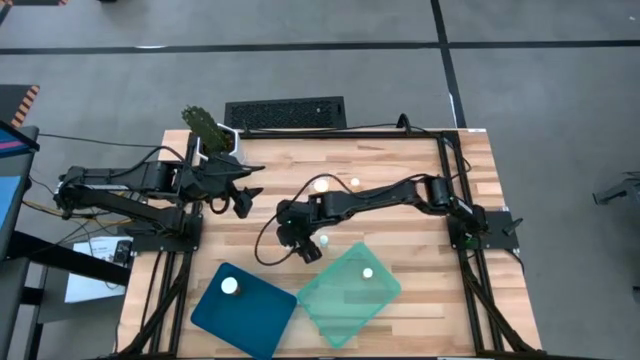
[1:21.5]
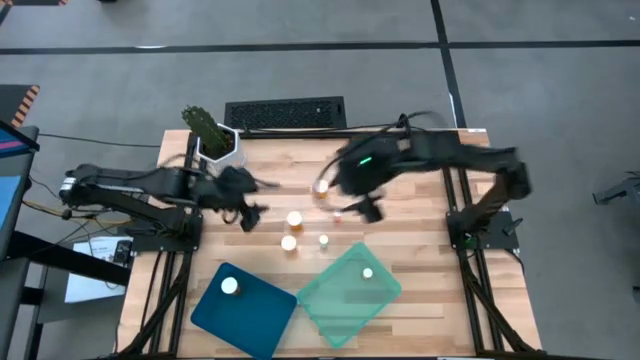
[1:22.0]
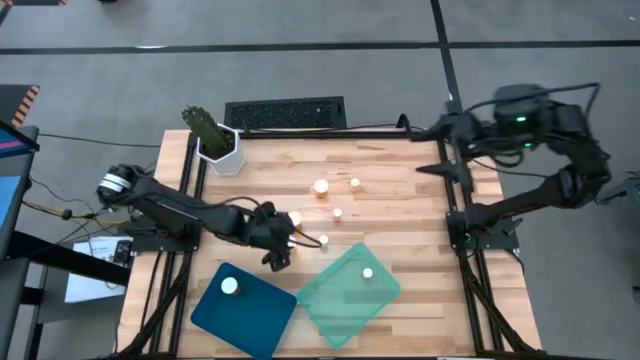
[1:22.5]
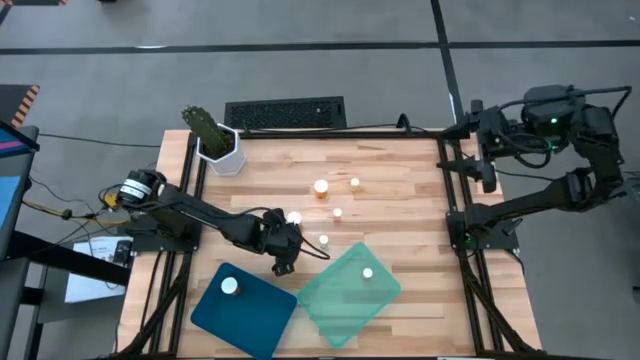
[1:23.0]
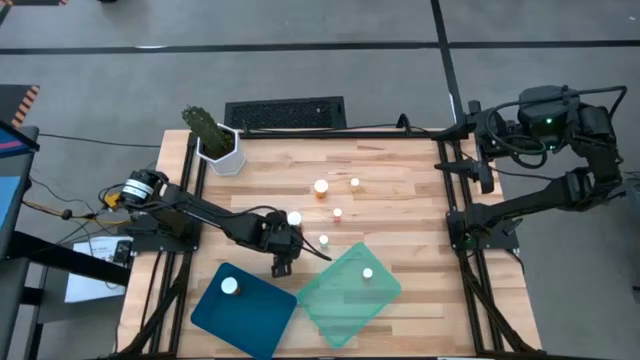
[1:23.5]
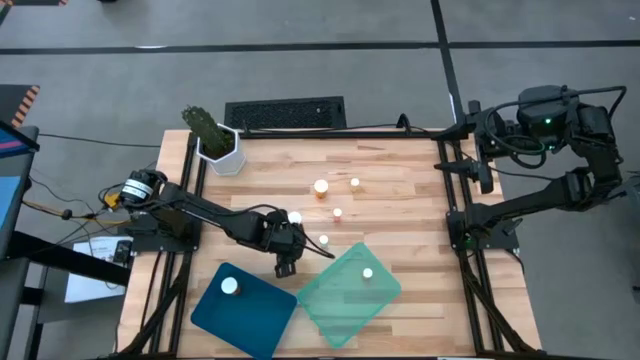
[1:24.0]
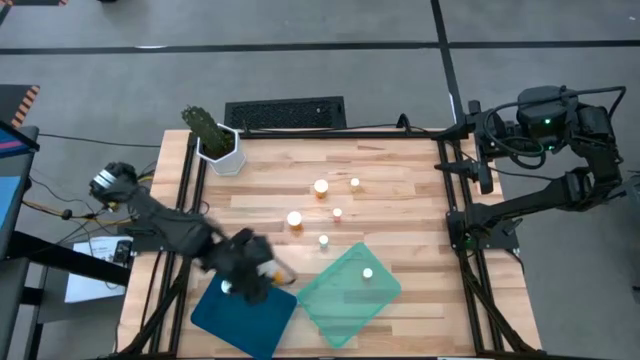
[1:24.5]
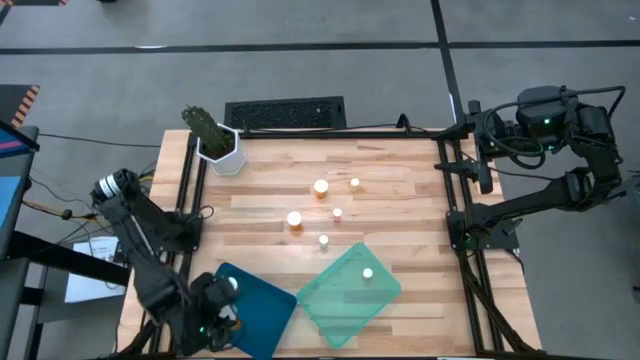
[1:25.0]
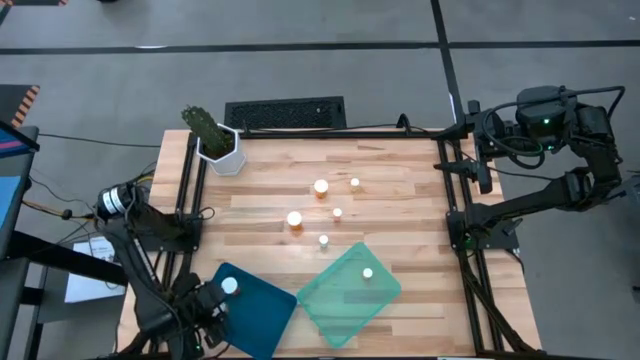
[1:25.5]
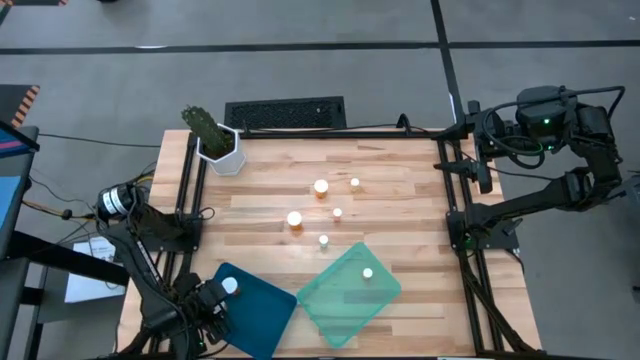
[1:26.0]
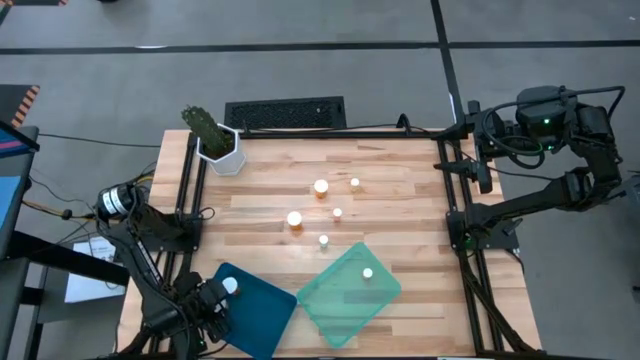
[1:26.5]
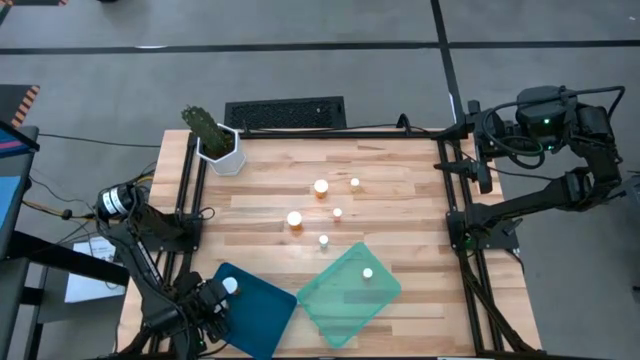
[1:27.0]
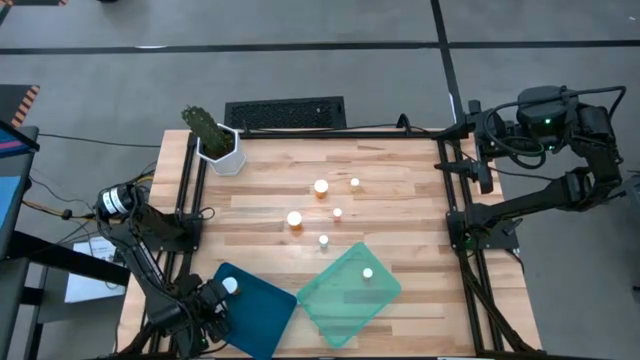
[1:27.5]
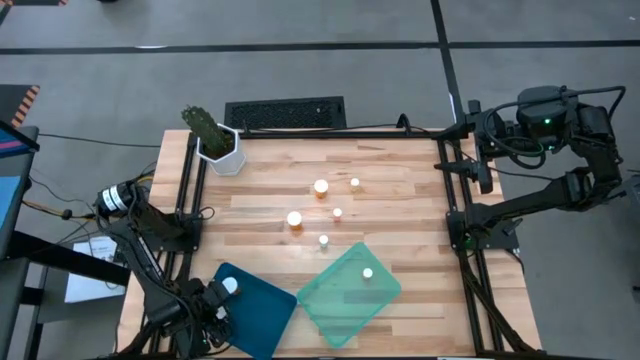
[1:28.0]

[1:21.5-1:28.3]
Task: Pick and place medicine bottles into bin by pill shape (circle, oval)
Put the big orange pill bottle into the blue bin

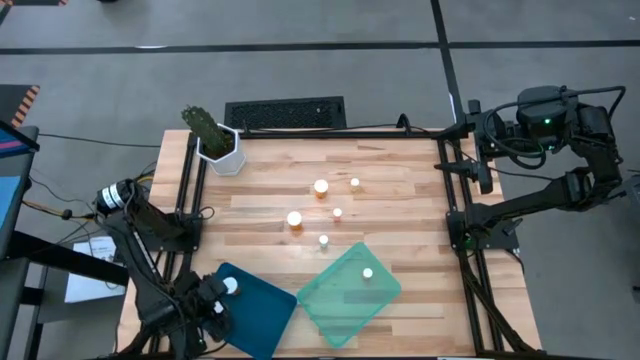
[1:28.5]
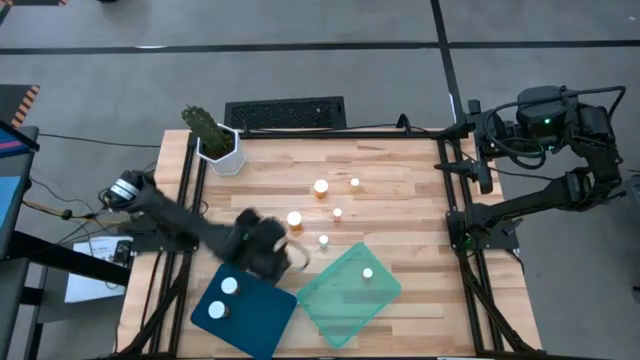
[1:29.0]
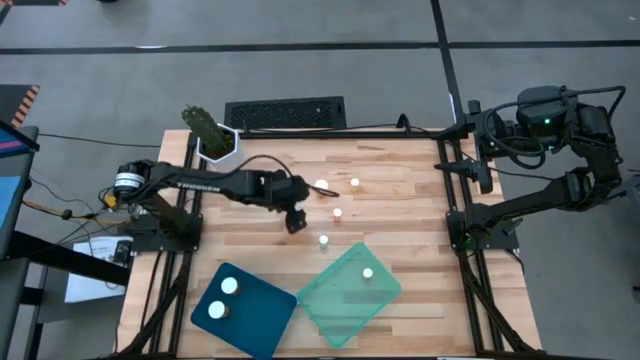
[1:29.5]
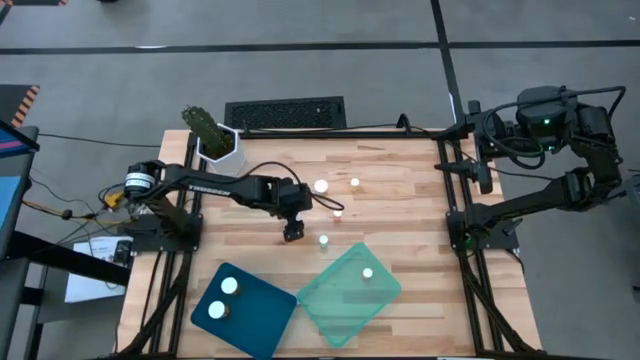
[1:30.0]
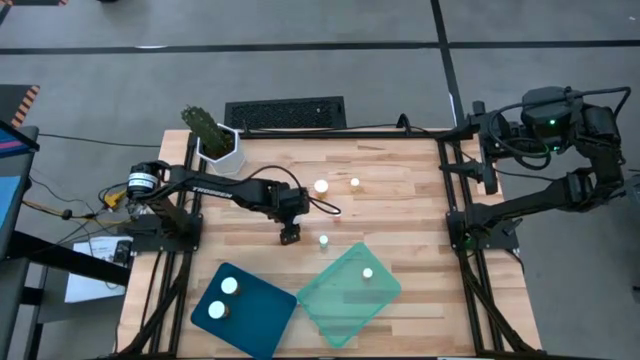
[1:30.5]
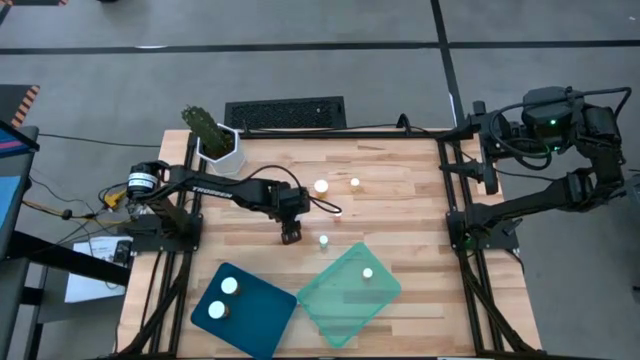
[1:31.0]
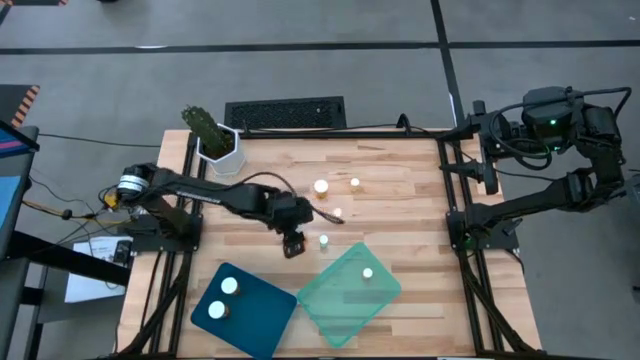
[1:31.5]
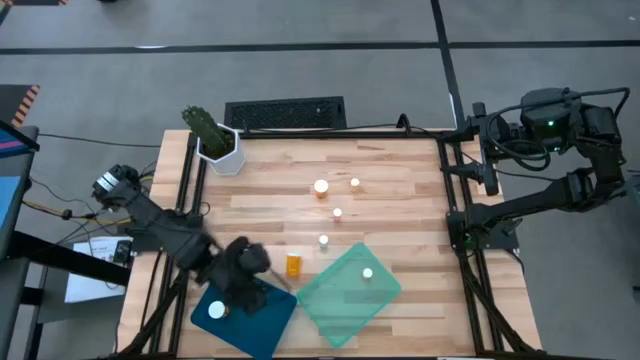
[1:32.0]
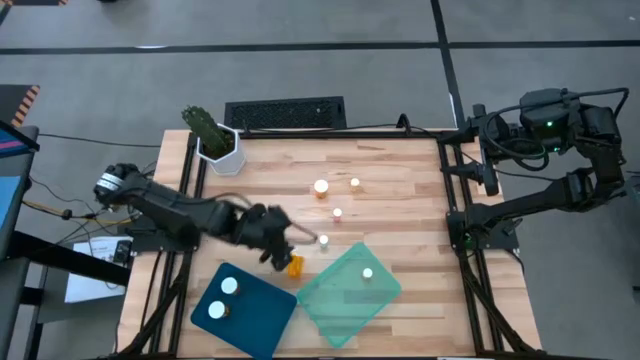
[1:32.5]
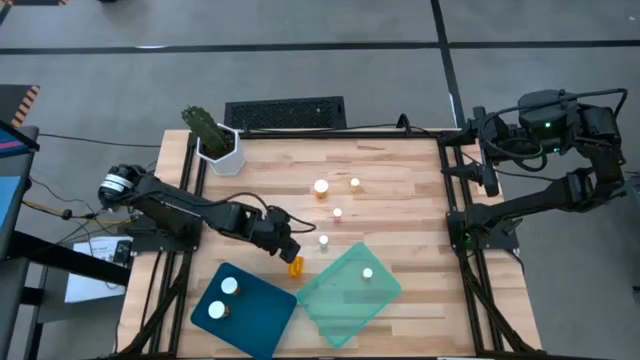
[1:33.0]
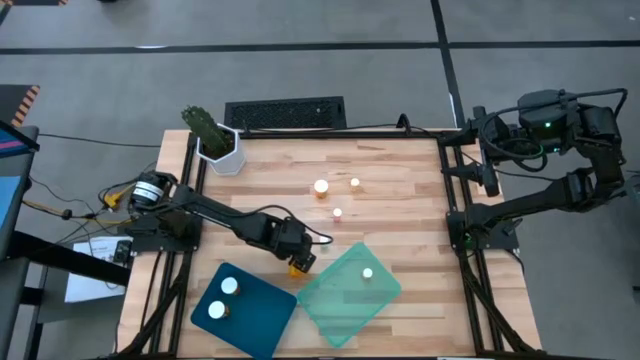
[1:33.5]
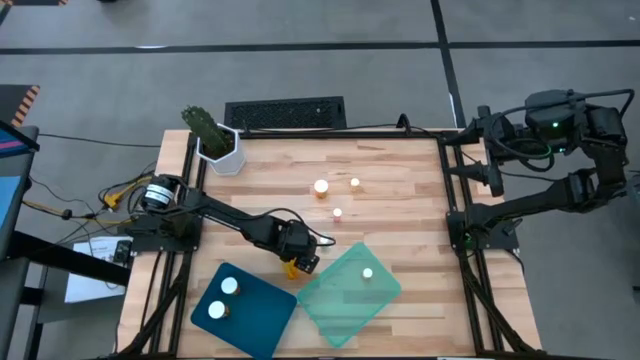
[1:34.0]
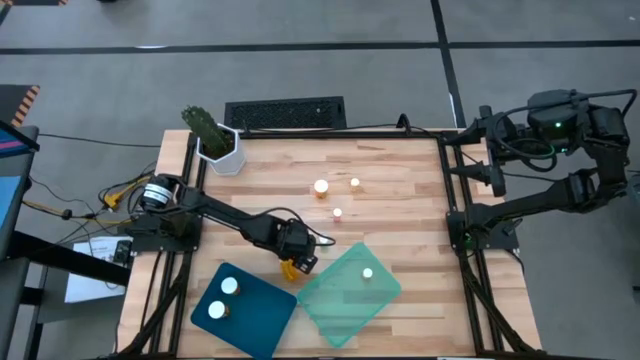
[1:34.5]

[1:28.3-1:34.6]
Put the big orange pill bottle into the blue bin

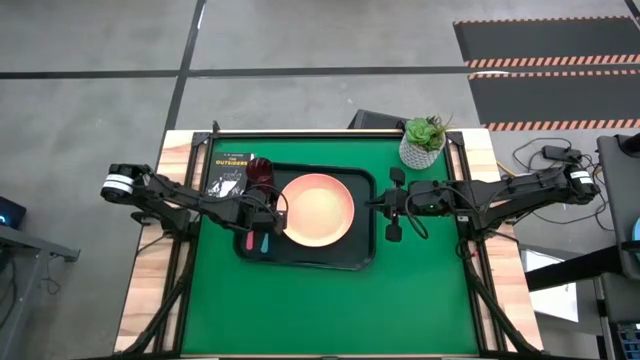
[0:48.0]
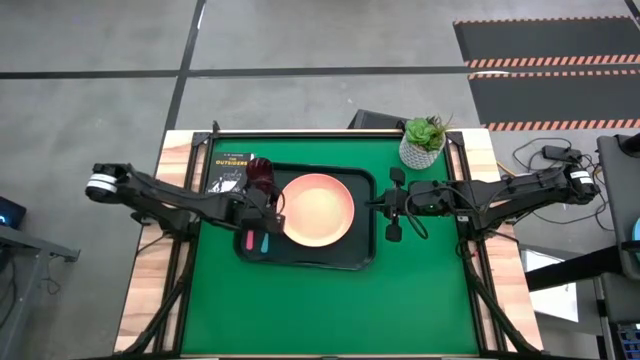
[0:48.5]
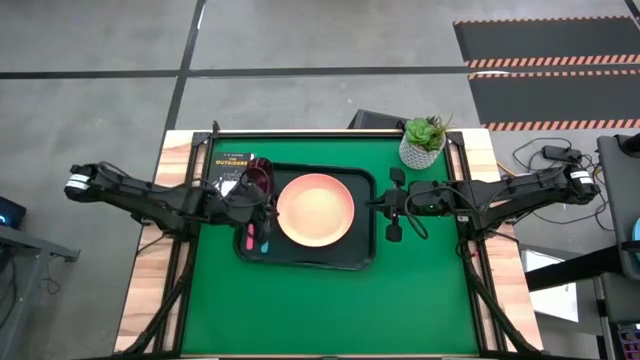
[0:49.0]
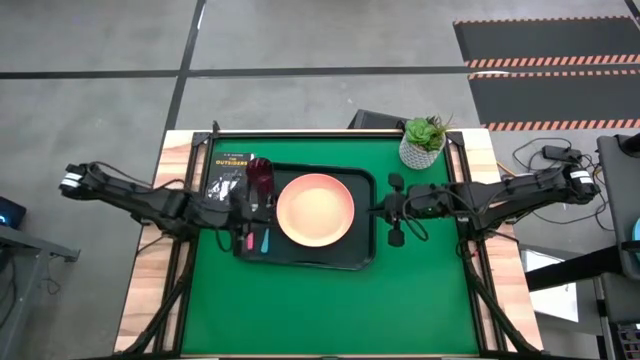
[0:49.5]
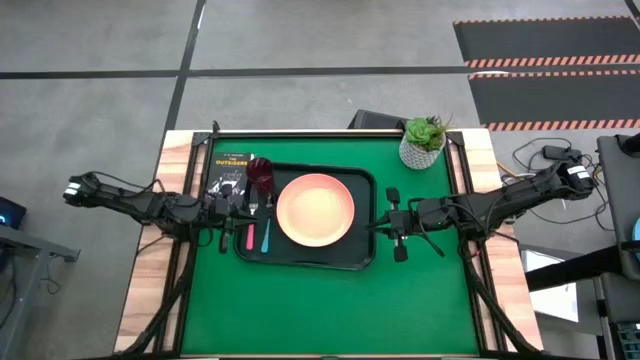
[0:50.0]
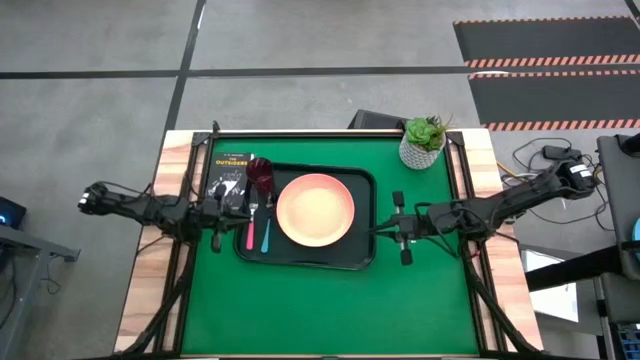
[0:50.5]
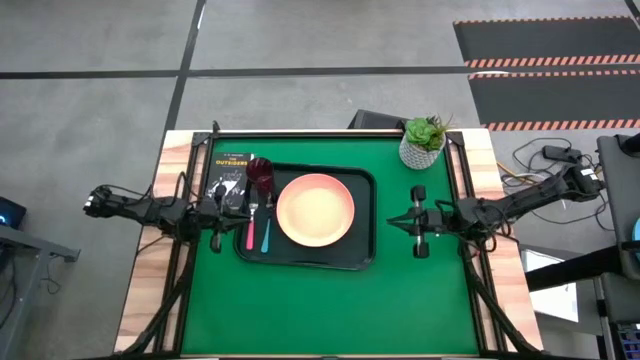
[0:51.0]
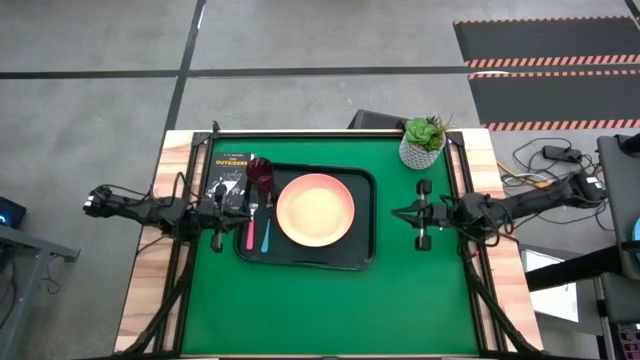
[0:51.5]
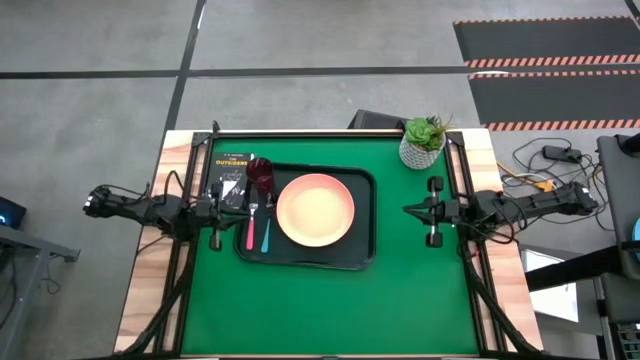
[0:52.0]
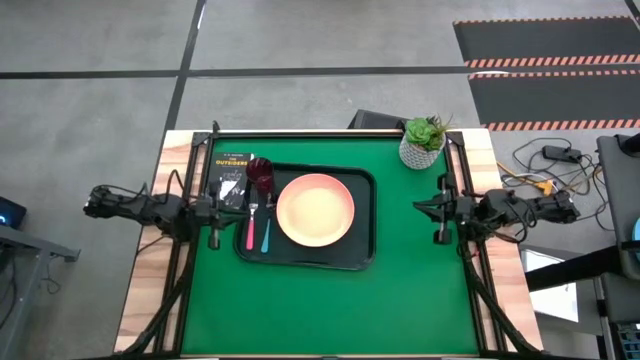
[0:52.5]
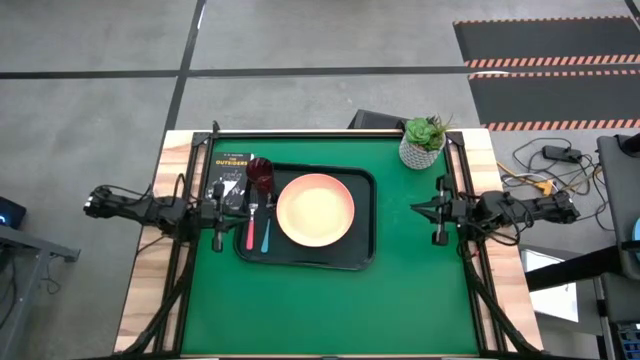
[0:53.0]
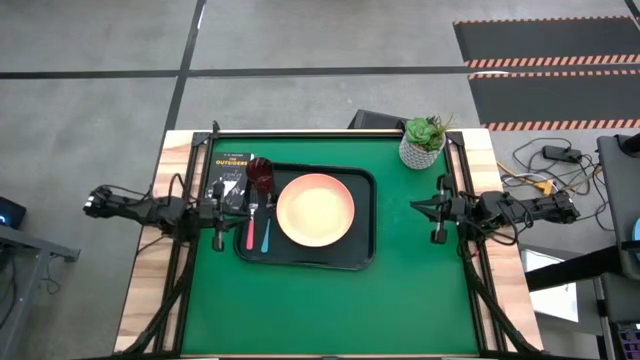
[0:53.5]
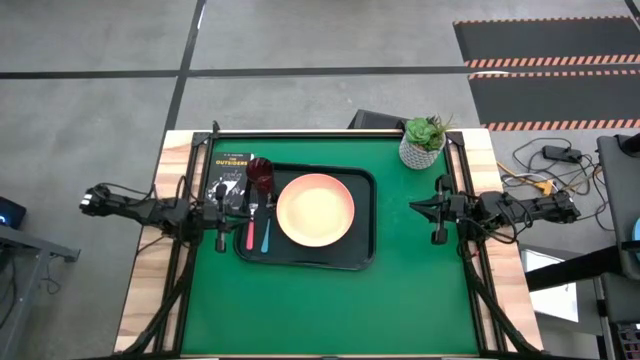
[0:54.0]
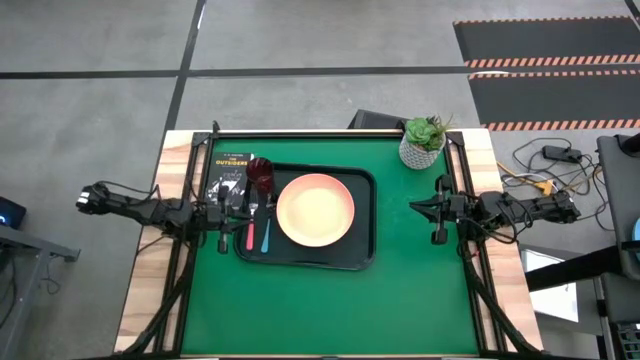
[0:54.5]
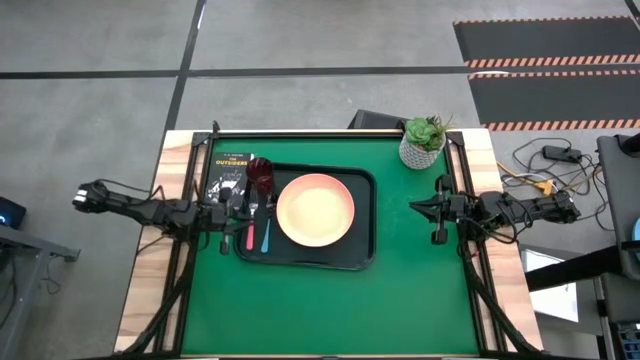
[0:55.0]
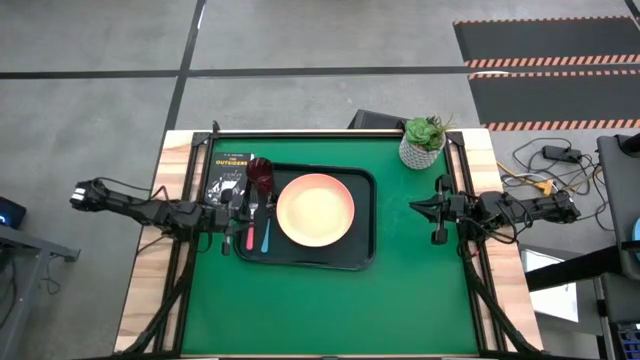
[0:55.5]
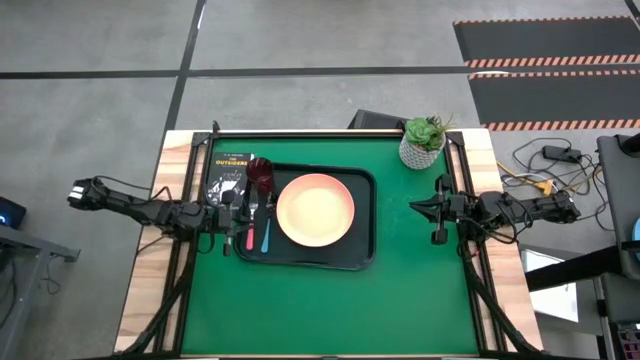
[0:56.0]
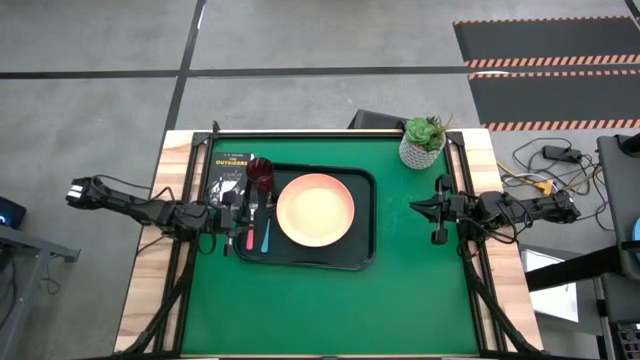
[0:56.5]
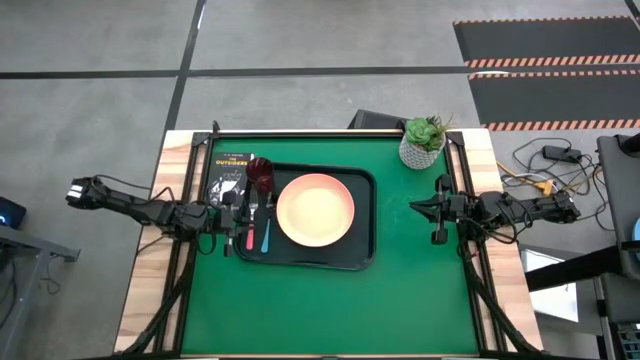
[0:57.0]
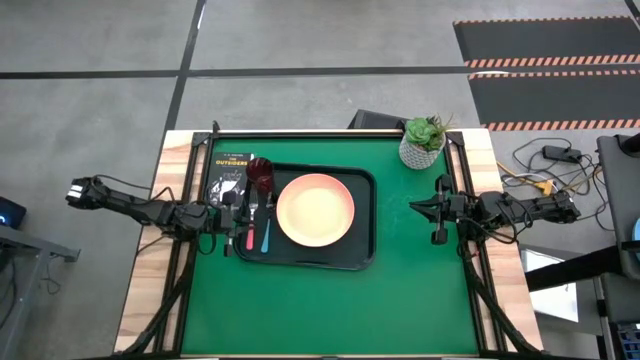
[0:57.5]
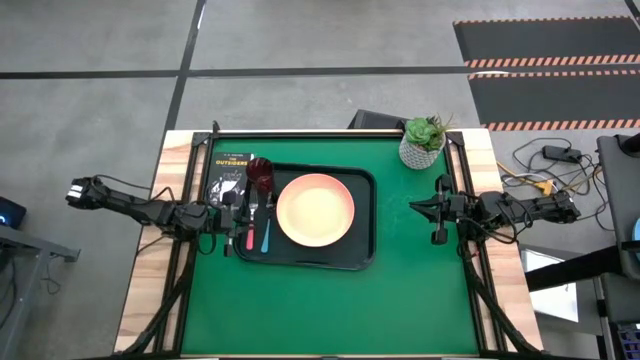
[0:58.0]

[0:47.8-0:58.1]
Task: Pick and place plate/cup/fork/spoon on tray
Return to Home Position
